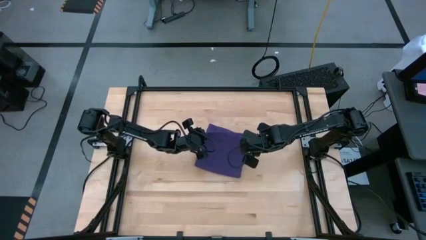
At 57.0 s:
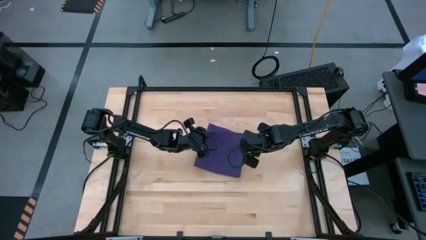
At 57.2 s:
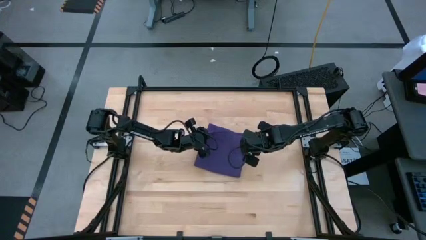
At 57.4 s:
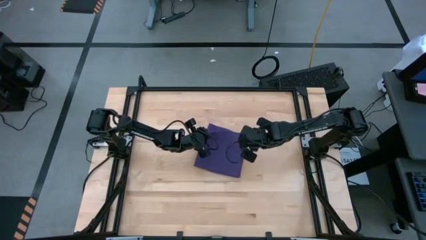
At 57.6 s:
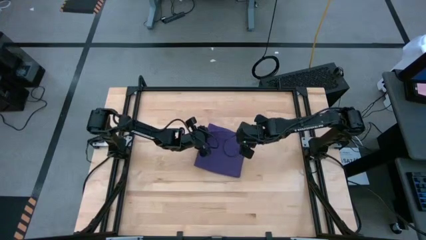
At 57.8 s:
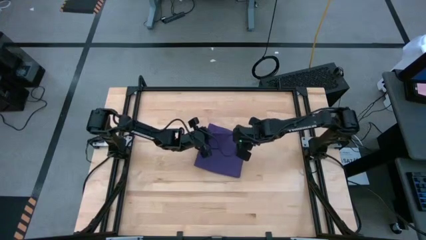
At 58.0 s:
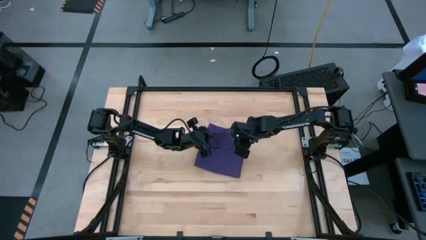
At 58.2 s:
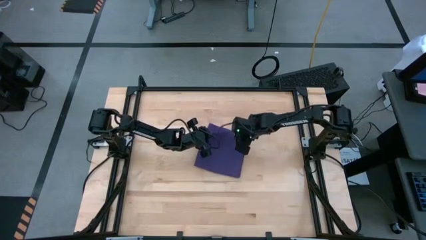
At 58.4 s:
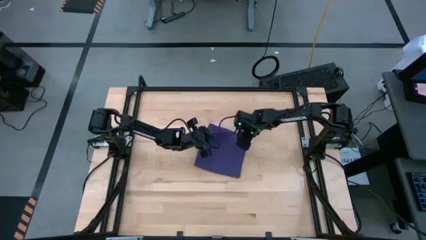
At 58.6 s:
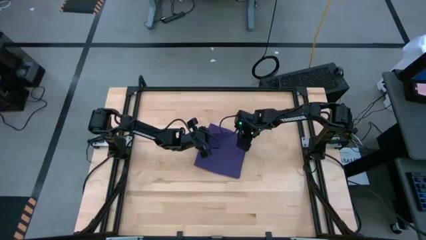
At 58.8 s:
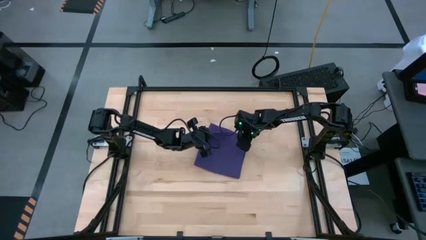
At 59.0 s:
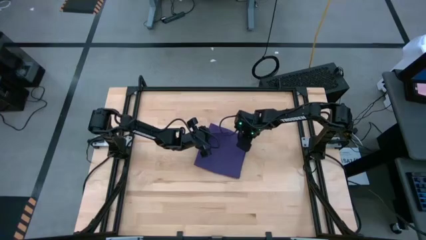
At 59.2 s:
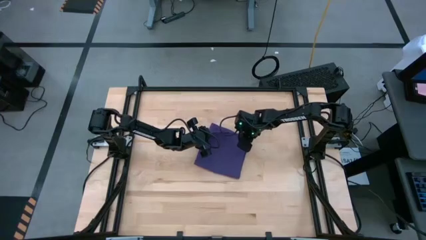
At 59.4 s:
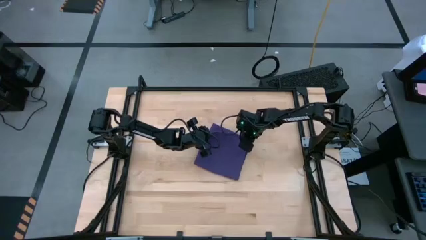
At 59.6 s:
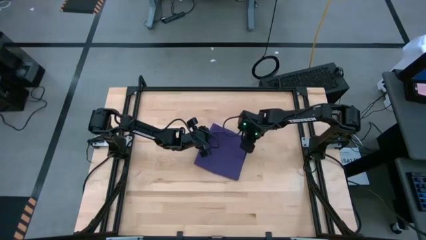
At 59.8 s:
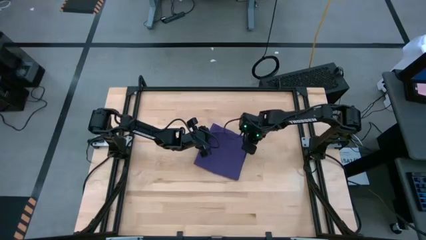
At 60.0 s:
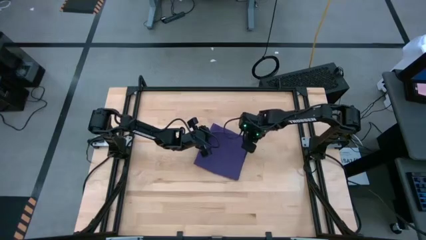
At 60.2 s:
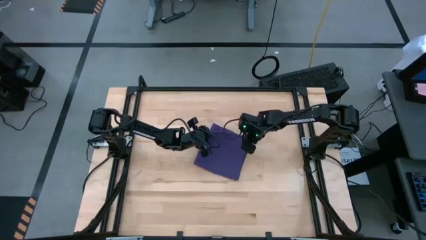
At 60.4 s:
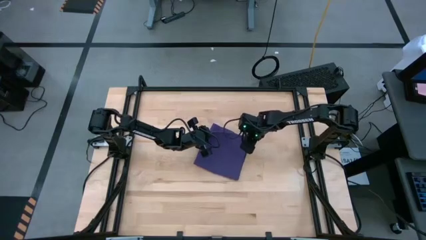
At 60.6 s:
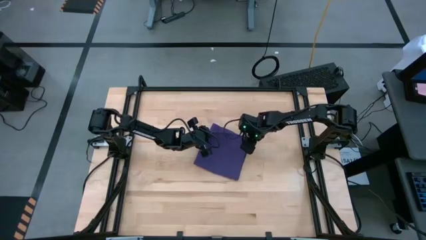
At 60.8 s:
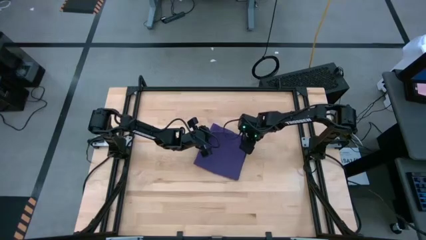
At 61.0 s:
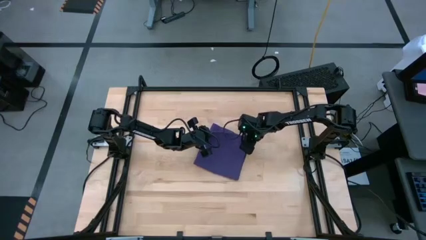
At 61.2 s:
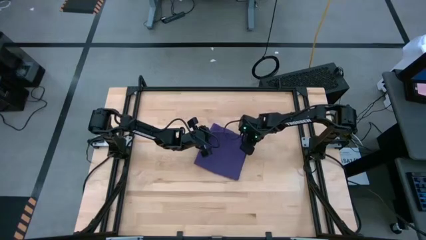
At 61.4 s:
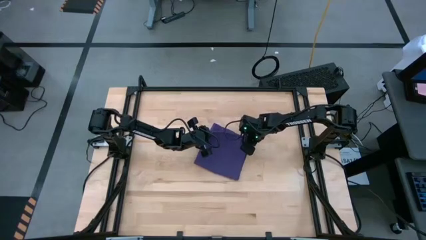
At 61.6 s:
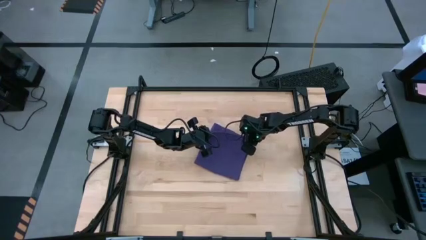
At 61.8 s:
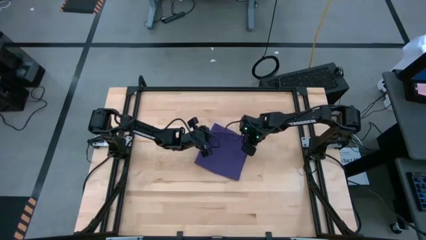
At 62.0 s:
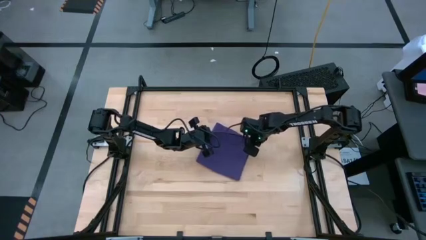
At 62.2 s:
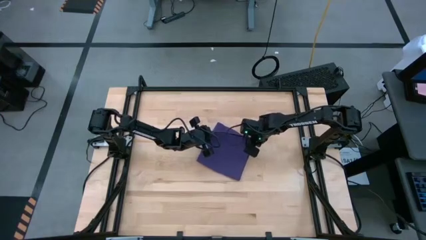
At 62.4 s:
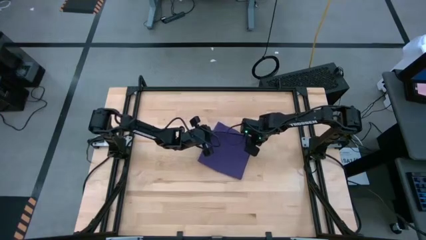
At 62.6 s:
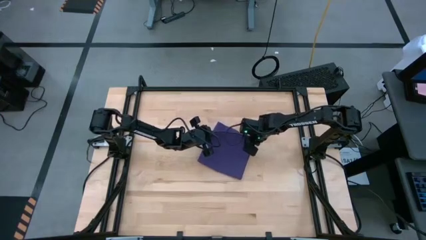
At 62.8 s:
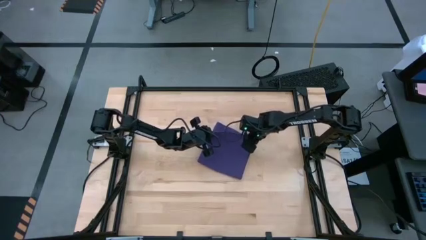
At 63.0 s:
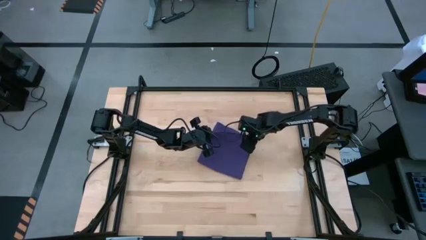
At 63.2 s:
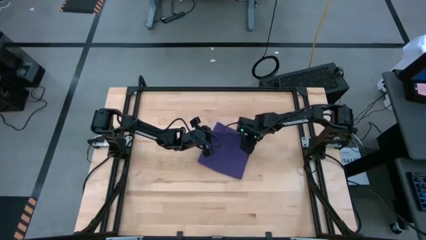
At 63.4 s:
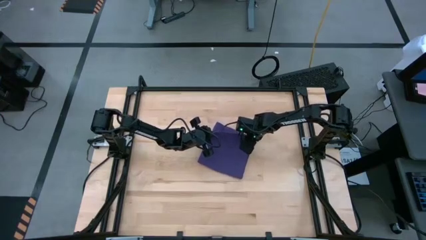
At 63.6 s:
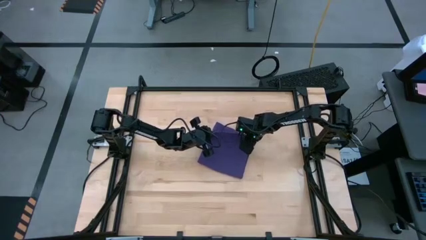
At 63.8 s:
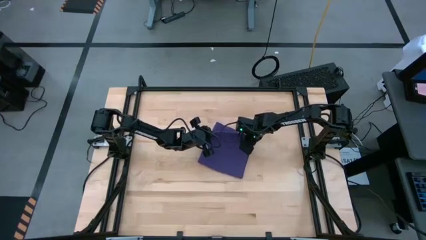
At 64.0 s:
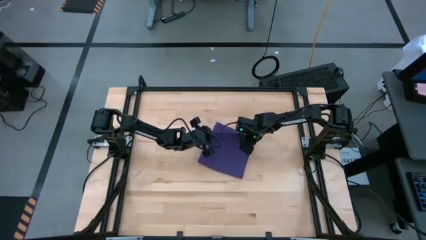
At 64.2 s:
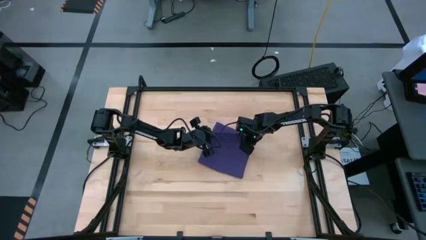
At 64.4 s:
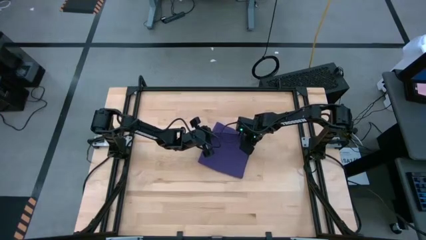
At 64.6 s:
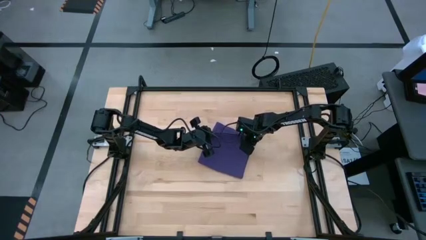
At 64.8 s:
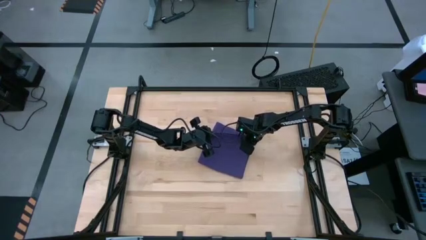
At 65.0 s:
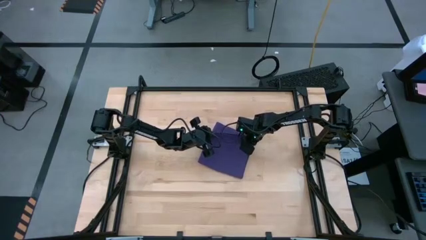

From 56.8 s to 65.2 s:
Task: Roll towel
Roll the purple towel

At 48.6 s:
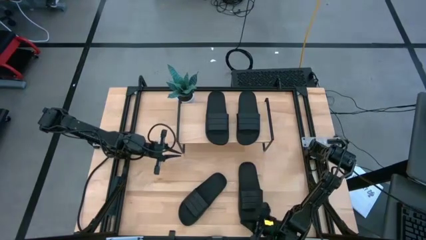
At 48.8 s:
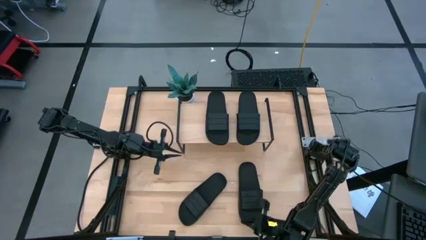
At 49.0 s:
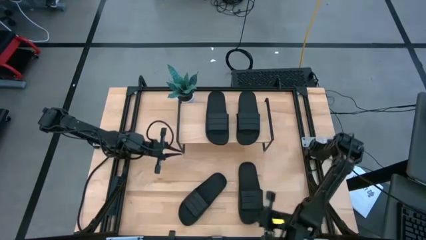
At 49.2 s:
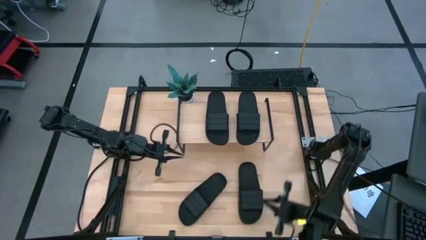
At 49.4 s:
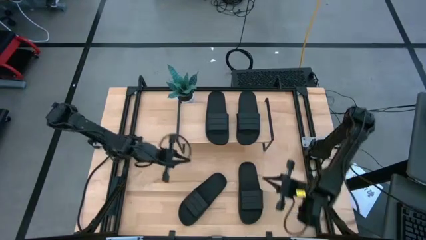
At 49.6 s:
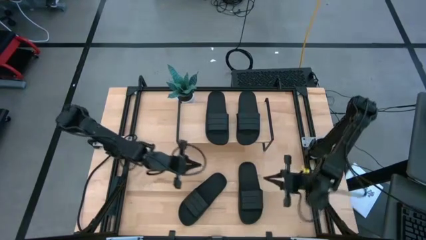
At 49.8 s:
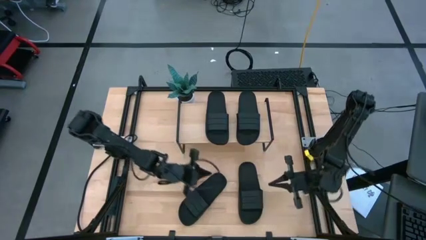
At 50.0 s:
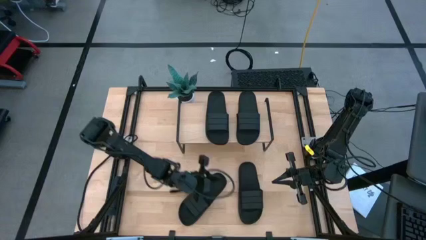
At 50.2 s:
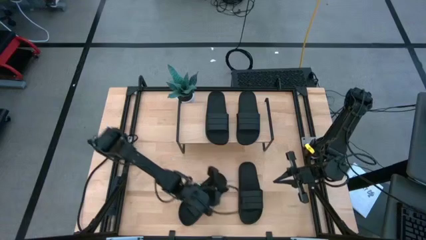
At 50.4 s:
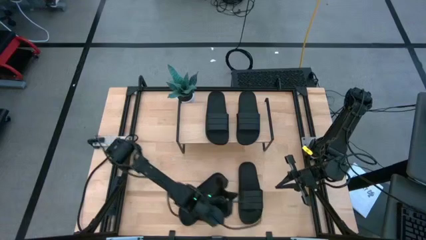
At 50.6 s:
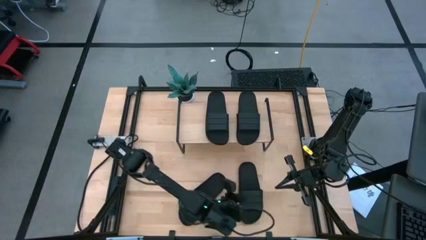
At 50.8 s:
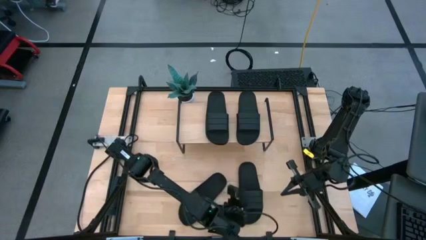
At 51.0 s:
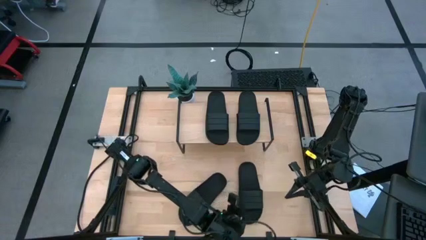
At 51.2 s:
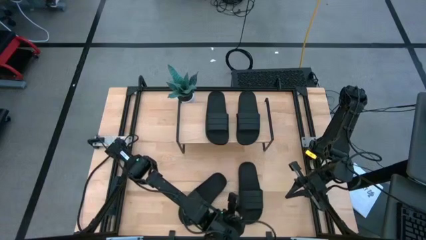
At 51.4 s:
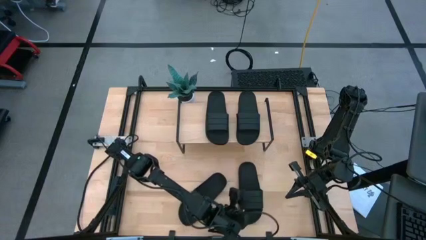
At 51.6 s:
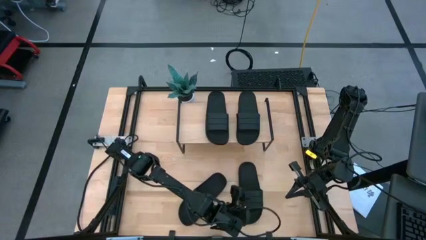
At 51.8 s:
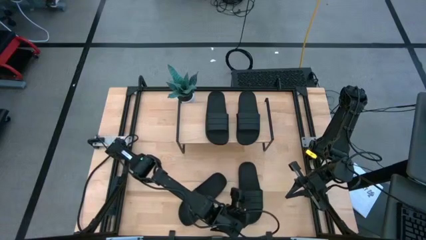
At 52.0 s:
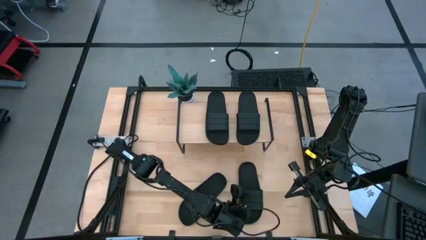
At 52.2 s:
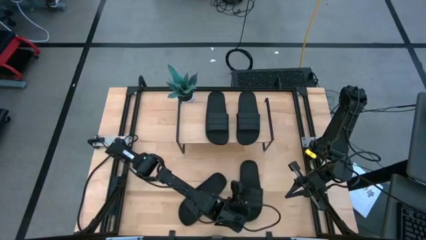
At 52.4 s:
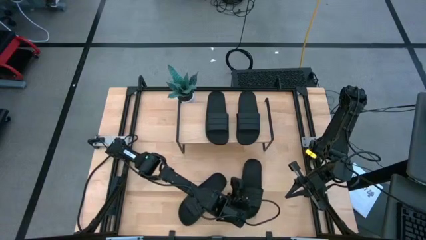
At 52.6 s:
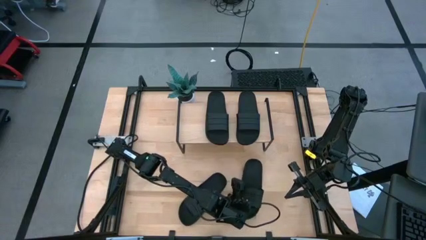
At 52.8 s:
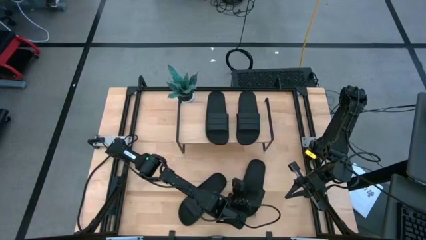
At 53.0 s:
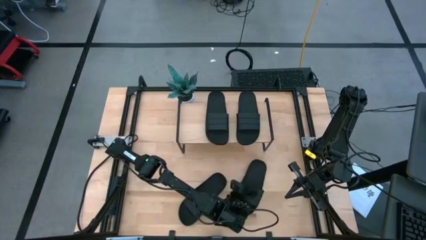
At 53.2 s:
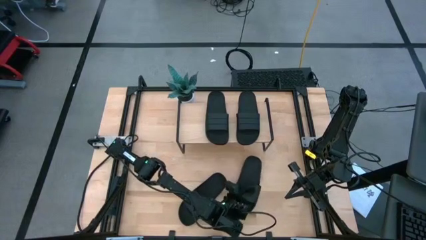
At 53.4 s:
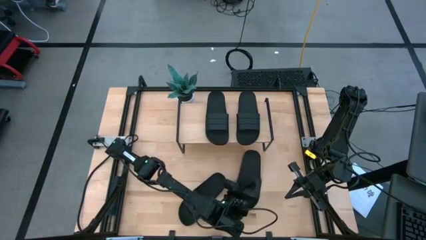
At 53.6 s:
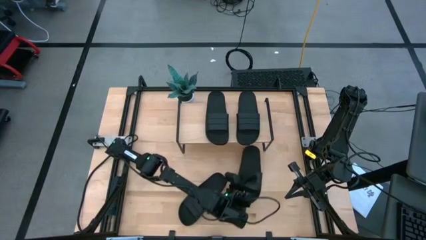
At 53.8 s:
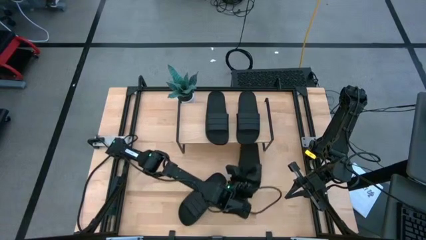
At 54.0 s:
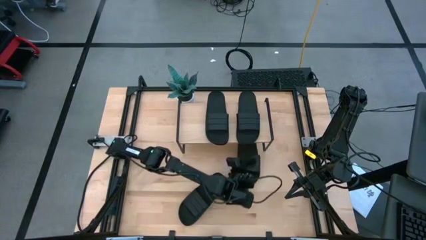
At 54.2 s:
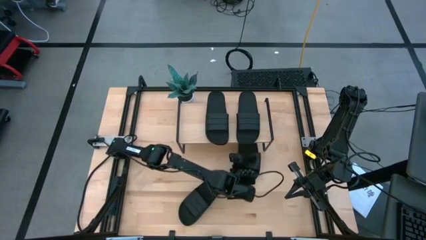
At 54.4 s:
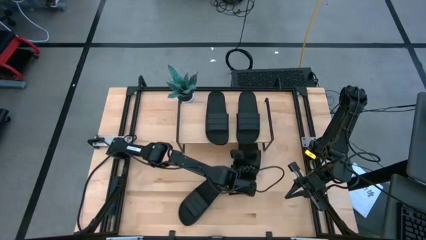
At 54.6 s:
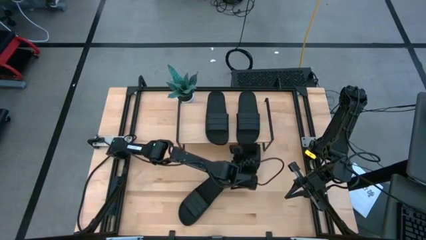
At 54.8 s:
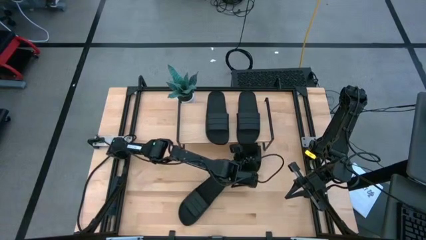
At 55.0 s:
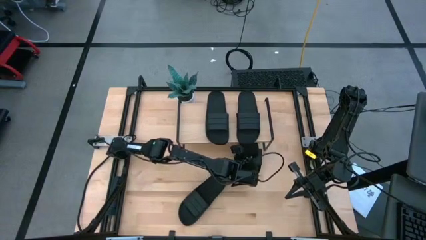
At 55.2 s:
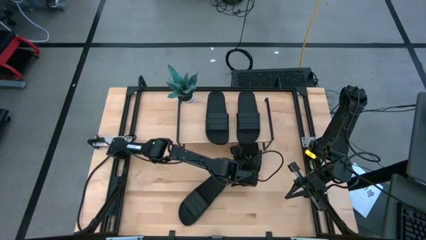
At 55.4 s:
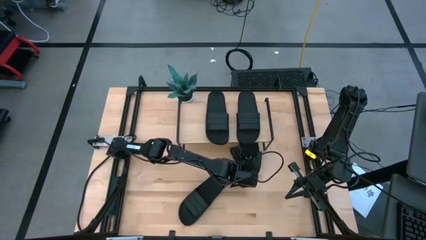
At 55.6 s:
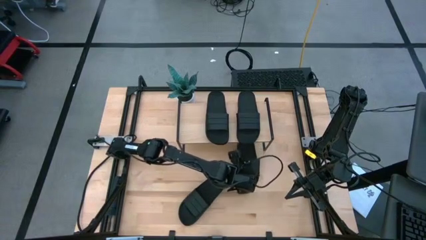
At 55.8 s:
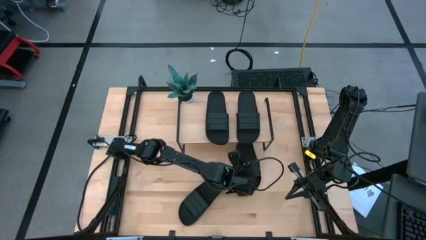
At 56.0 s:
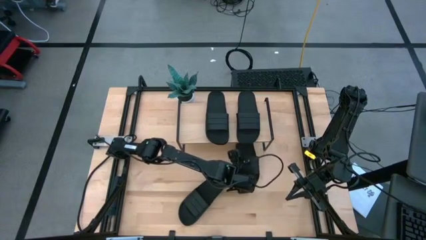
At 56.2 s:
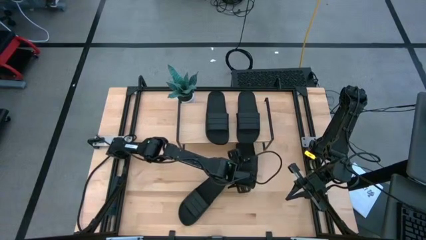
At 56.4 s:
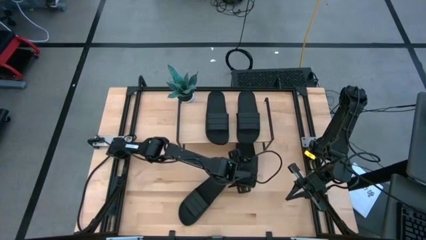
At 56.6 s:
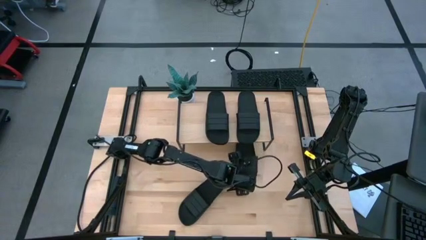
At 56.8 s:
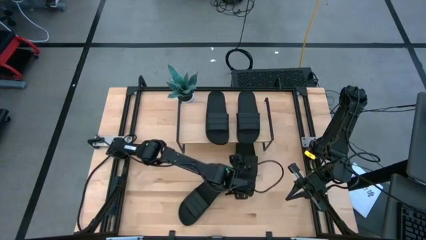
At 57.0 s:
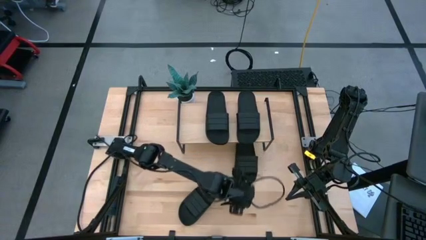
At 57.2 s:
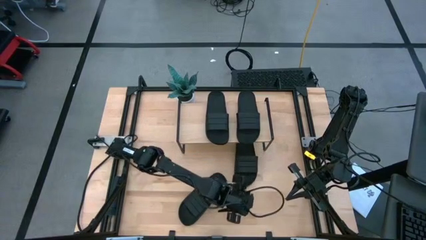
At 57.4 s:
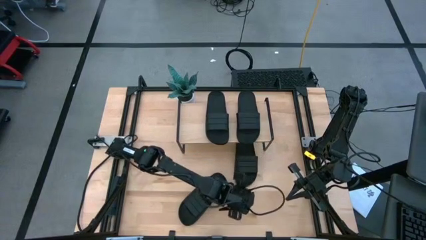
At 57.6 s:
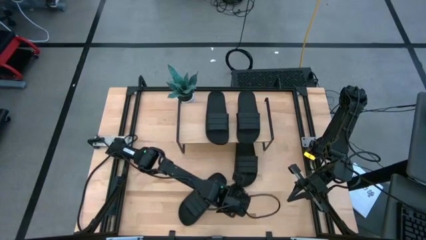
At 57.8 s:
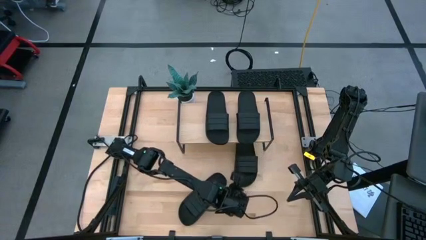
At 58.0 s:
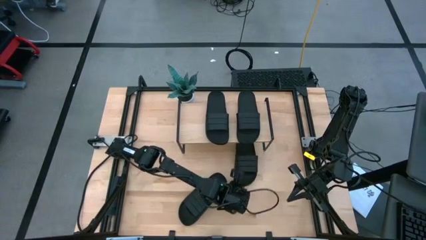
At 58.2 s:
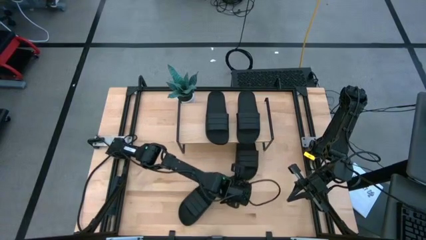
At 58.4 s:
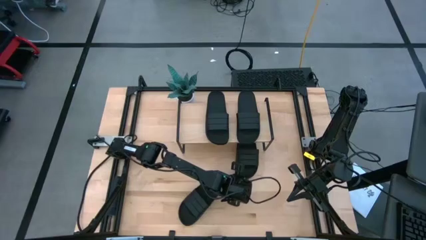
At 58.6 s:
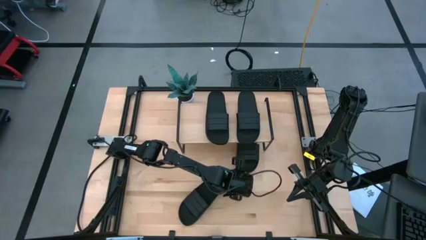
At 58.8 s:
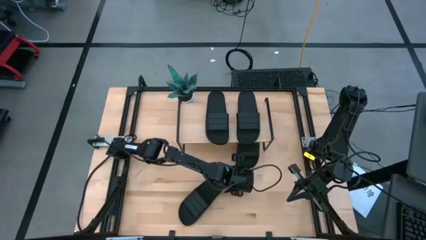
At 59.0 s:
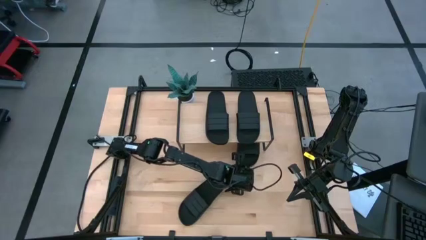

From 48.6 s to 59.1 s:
Task: Pick and place slides into the shelf
Put the right slide under the shelf
